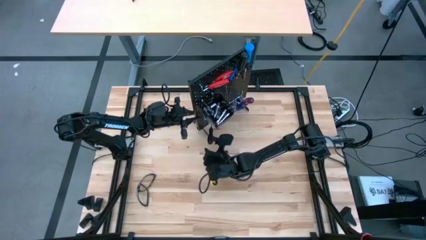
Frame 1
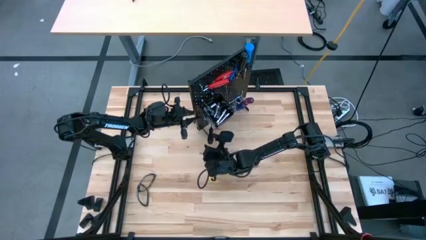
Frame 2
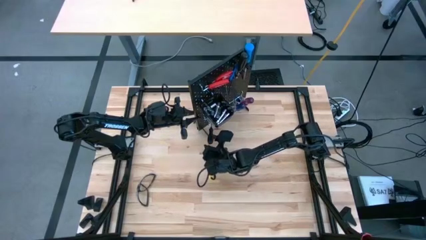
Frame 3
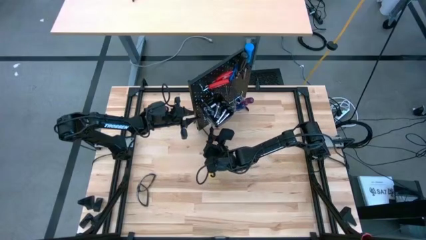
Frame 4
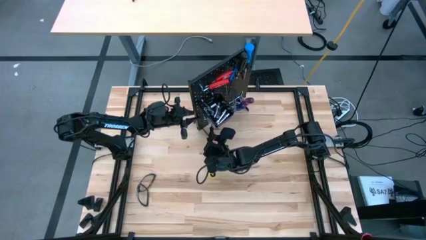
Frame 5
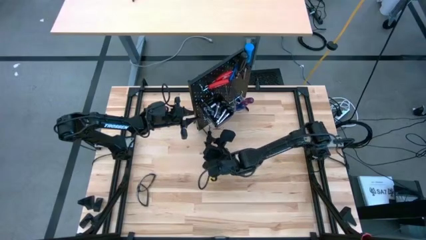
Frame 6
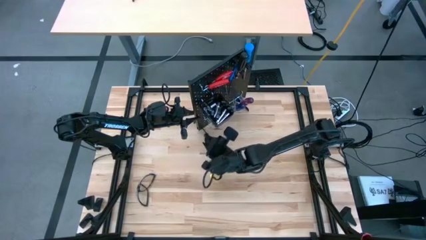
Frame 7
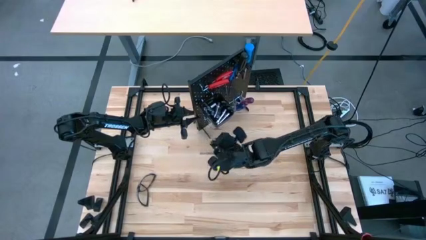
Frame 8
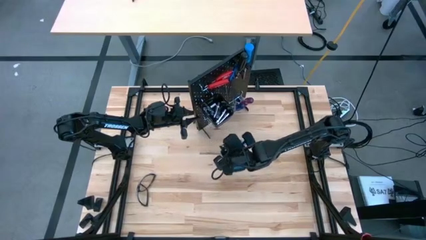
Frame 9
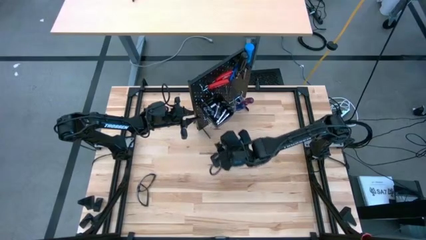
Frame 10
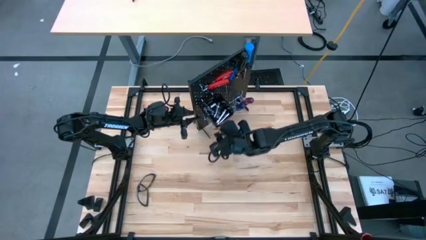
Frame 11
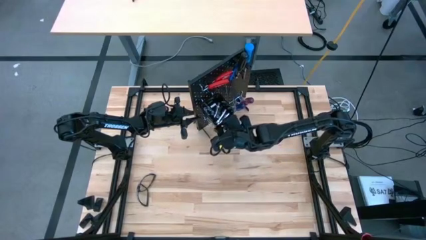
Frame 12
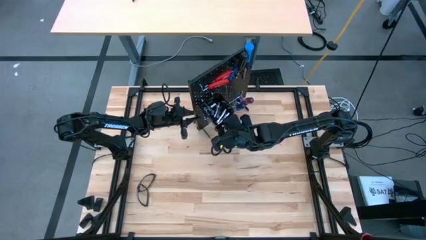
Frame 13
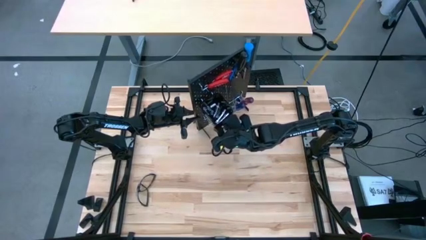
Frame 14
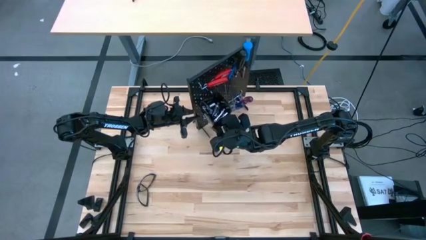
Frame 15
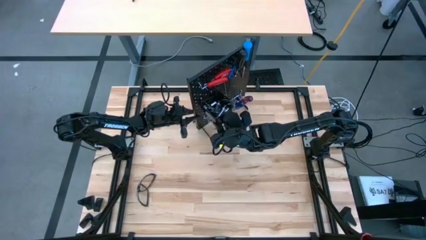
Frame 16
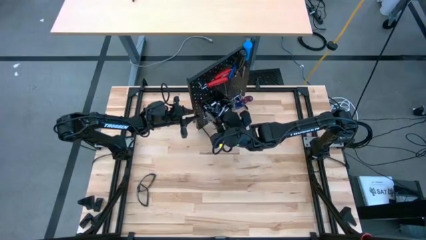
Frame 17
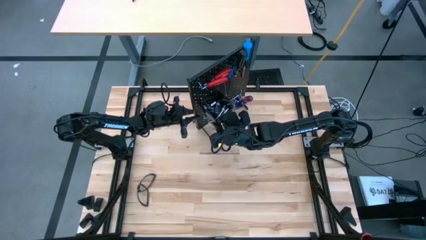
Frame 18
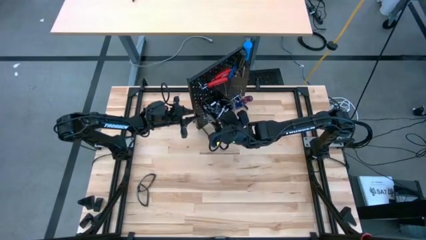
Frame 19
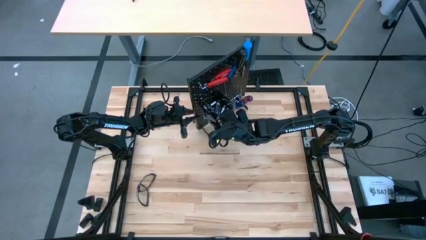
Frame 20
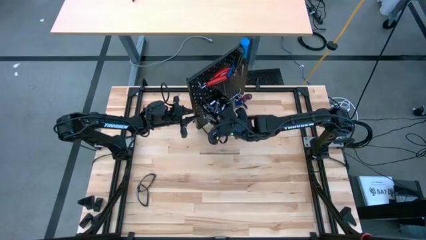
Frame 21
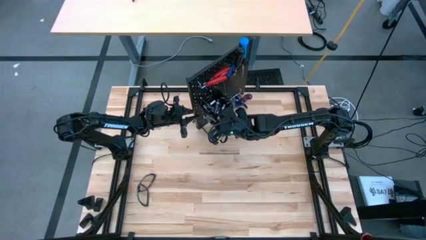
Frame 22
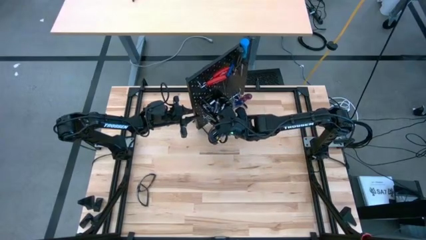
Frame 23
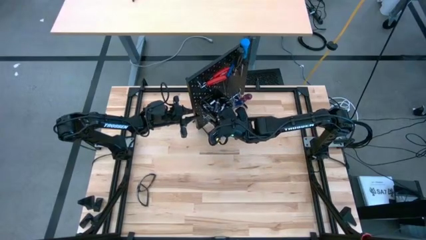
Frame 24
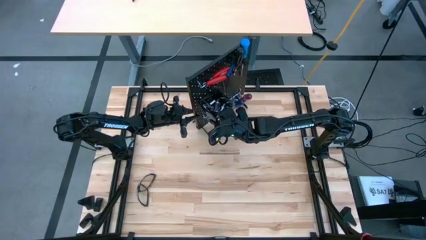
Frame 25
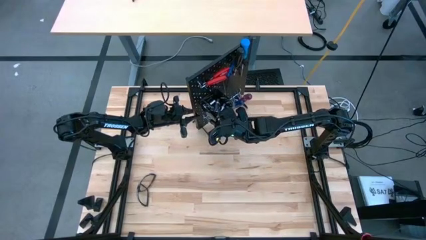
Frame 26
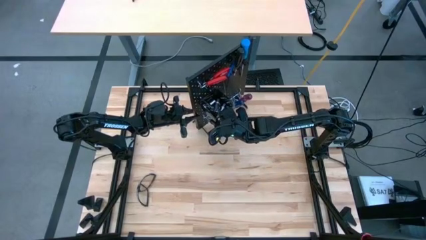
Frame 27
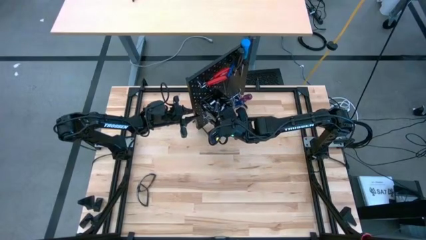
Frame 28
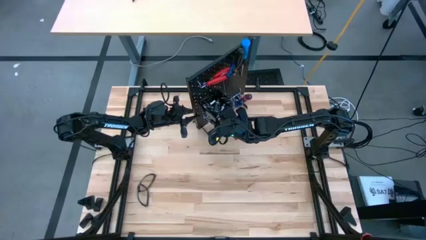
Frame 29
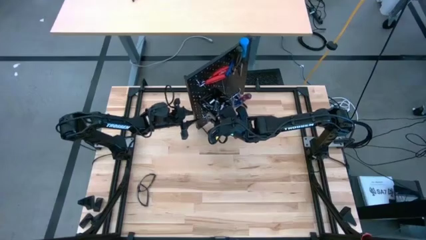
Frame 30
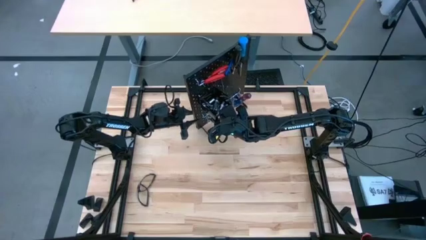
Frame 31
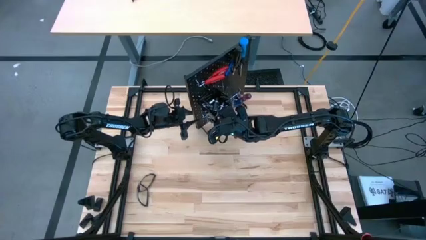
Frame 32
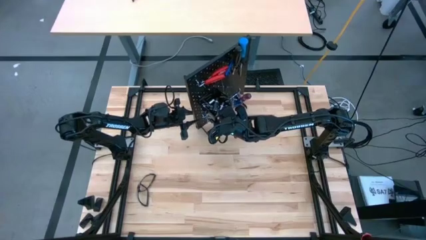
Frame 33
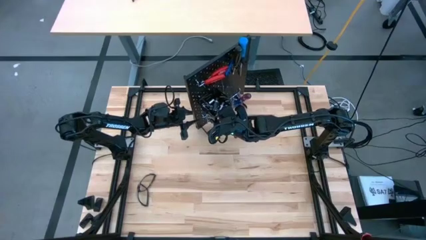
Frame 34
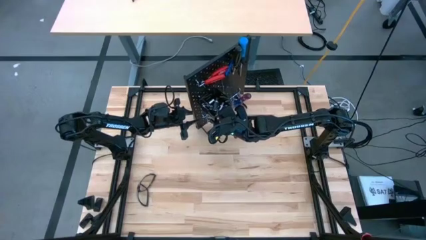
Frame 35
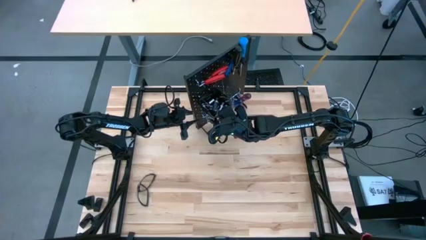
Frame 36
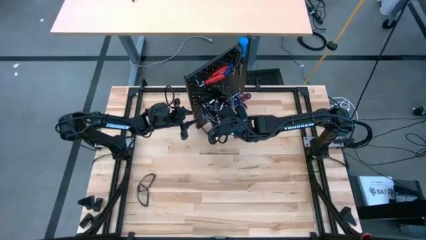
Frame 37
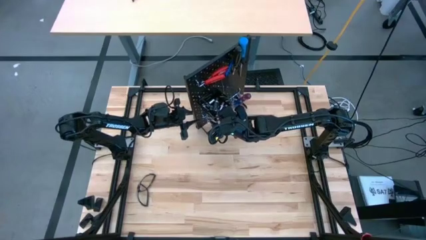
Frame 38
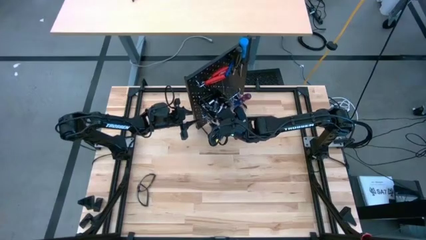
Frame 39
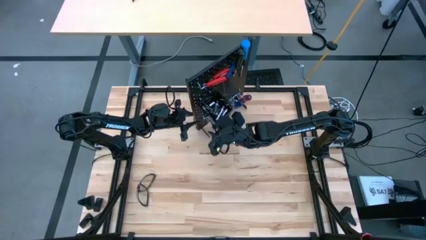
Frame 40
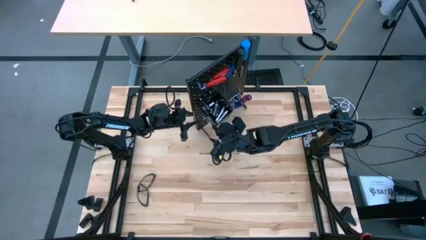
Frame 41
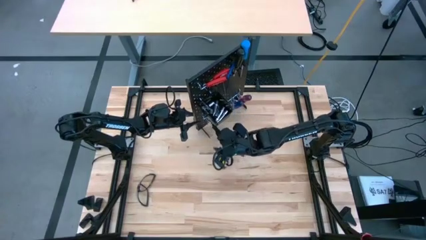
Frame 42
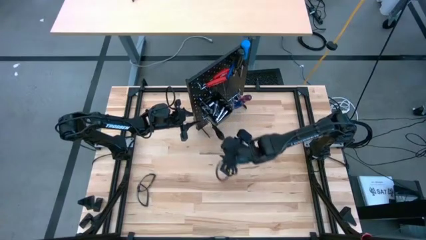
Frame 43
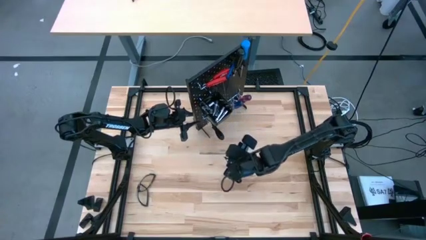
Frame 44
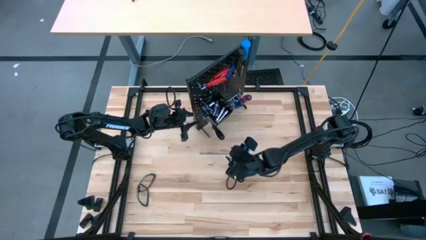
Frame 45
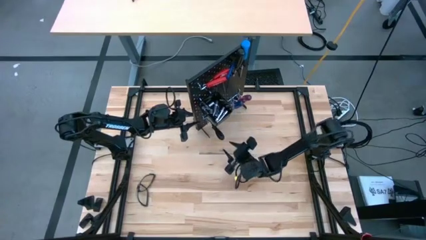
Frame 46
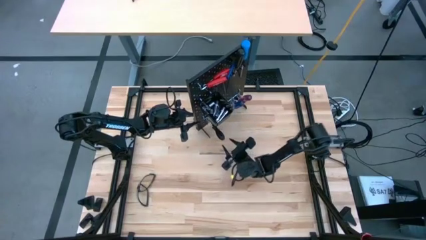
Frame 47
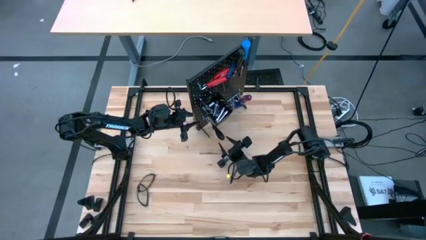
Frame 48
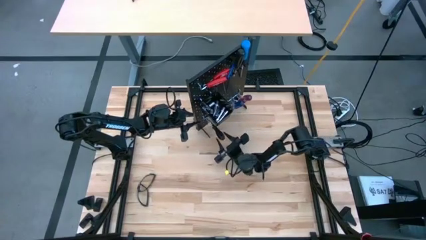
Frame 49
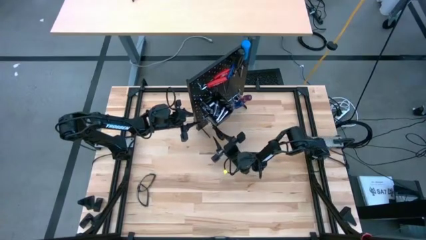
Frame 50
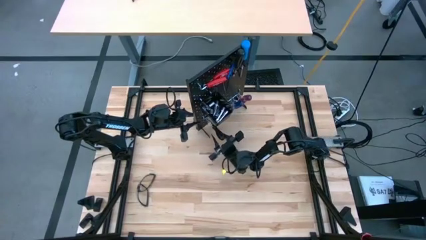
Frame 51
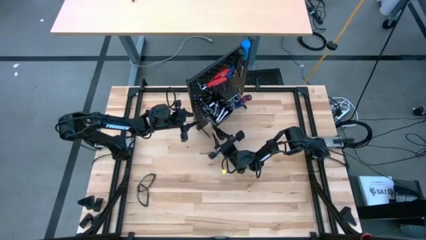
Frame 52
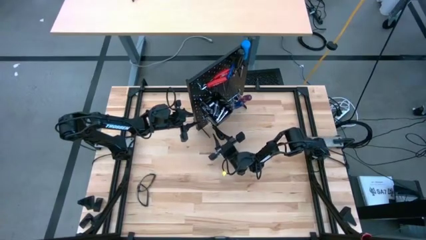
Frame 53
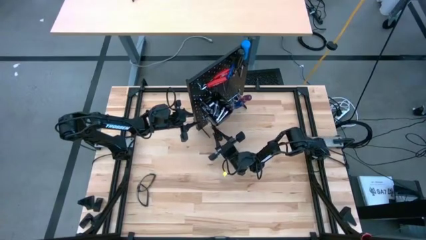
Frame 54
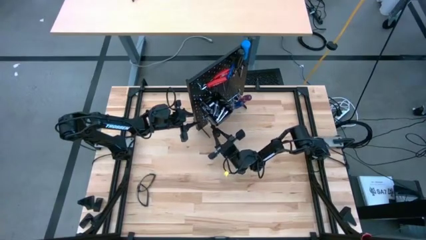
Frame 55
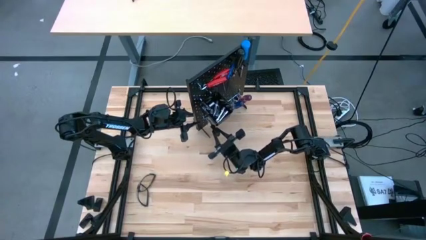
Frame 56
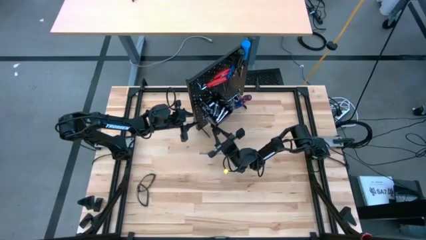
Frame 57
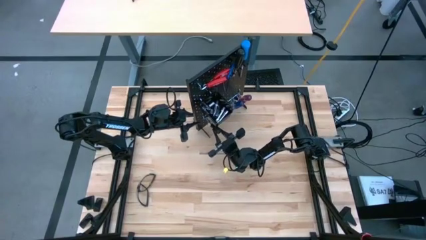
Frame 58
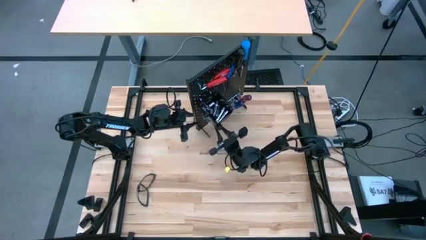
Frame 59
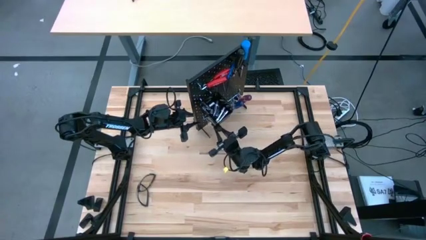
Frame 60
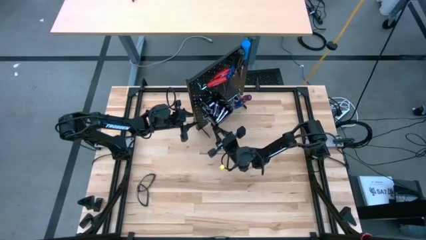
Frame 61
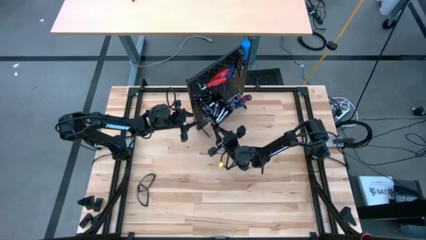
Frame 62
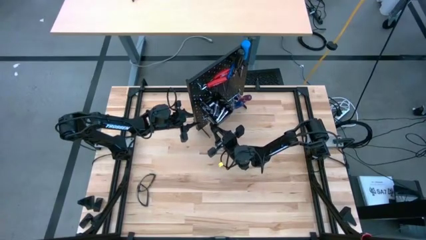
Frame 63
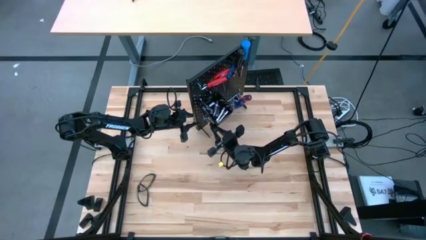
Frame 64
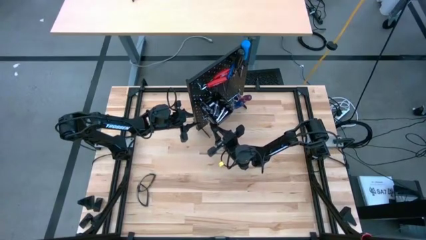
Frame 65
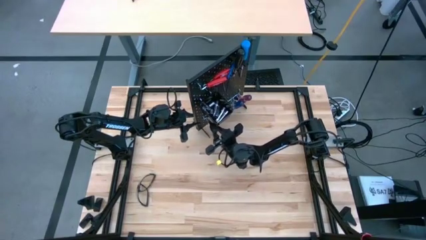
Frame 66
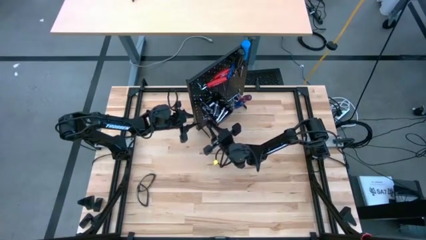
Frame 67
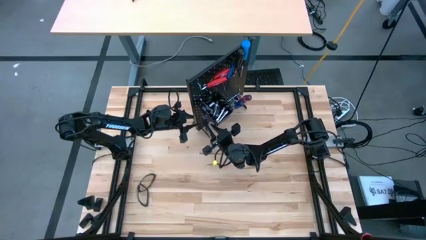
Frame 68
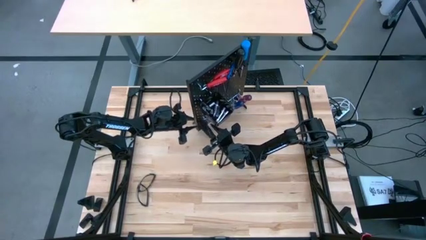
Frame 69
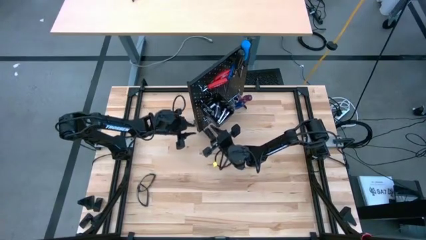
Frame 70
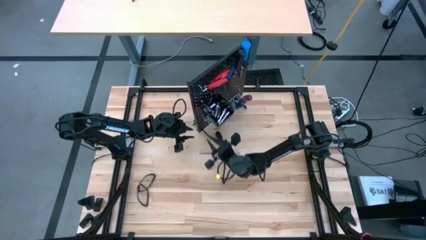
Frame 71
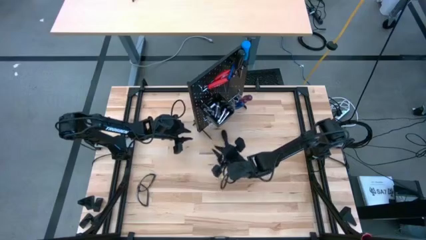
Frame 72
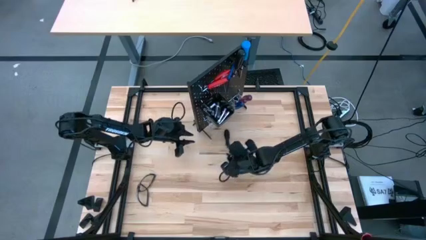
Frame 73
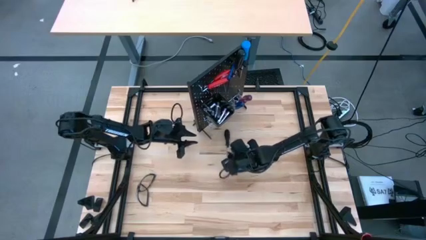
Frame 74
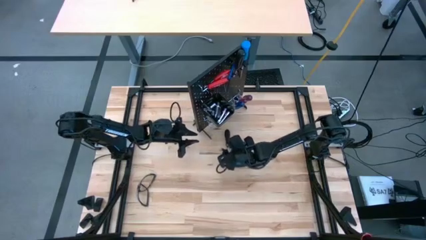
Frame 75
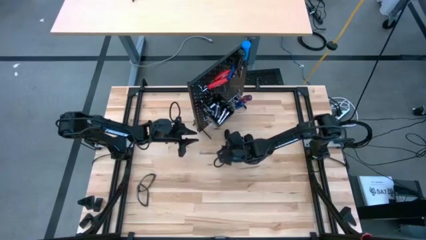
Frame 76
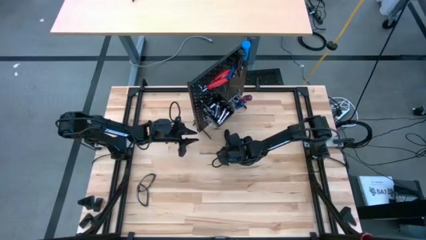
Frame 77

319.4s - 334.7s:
Task: Hang tools onto peg board
Hang the black screwdriver on the pegboard
